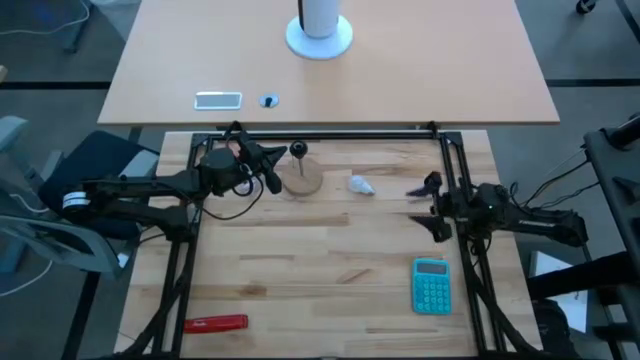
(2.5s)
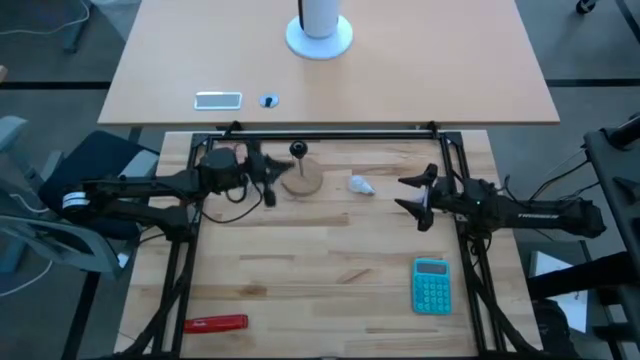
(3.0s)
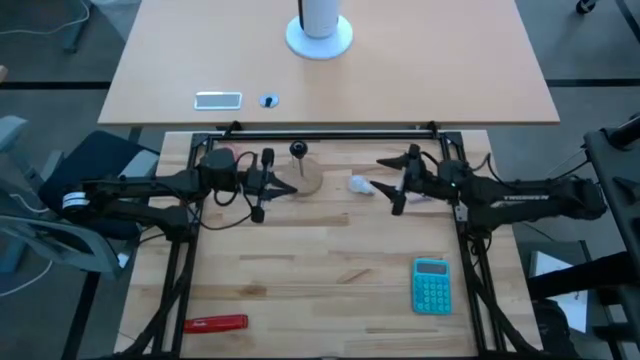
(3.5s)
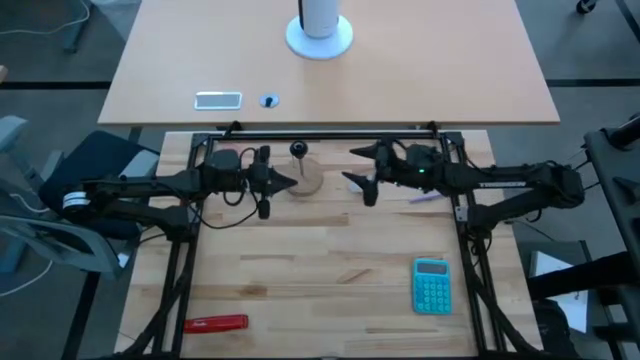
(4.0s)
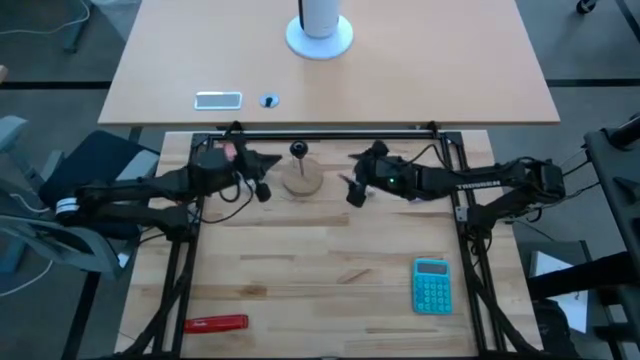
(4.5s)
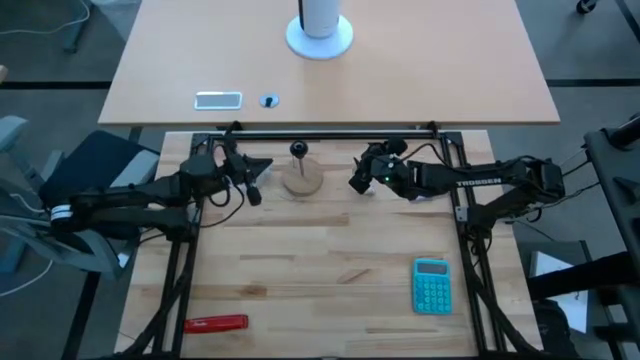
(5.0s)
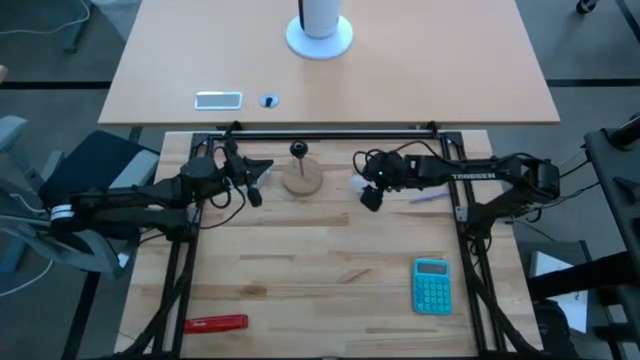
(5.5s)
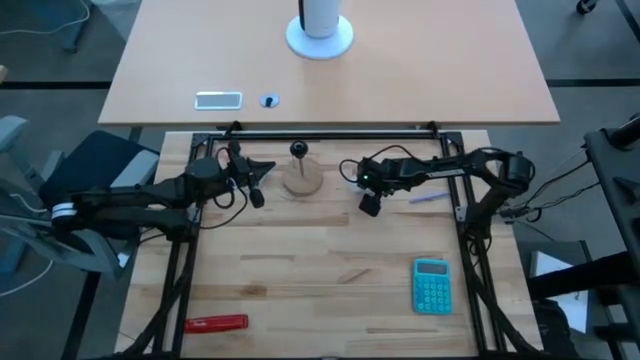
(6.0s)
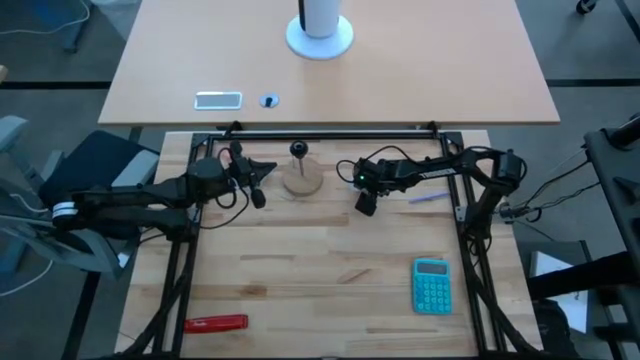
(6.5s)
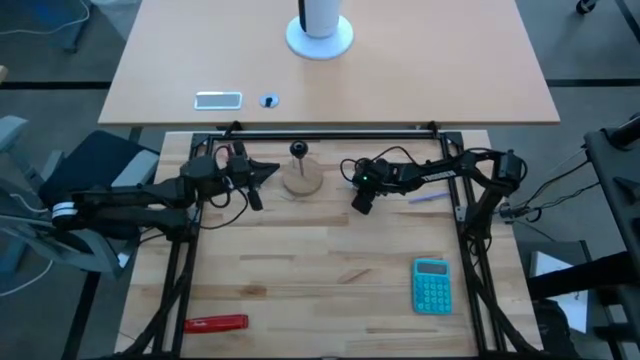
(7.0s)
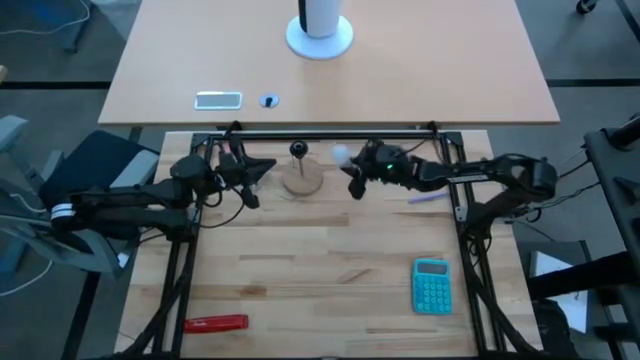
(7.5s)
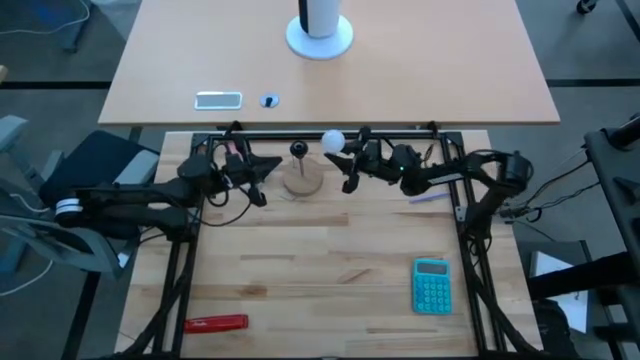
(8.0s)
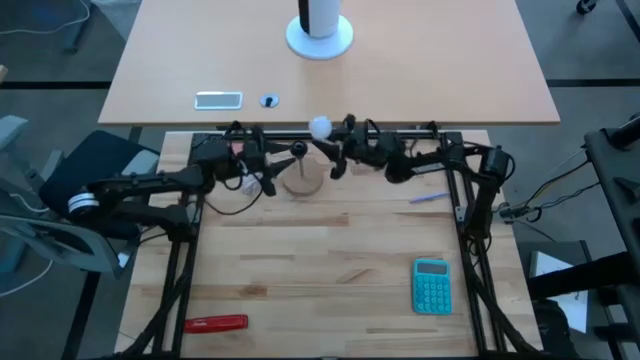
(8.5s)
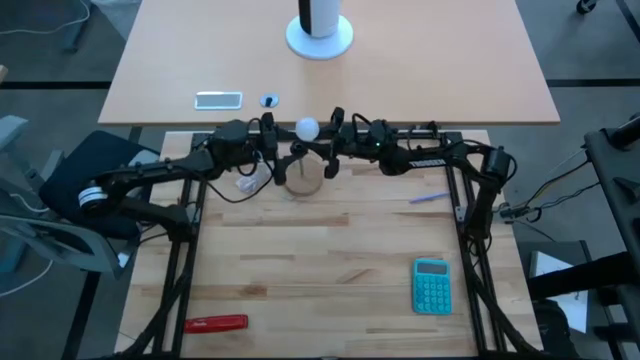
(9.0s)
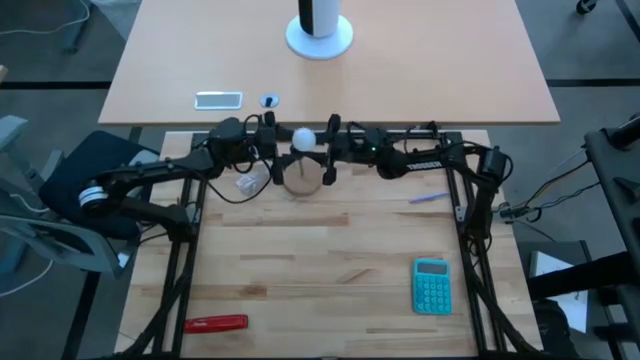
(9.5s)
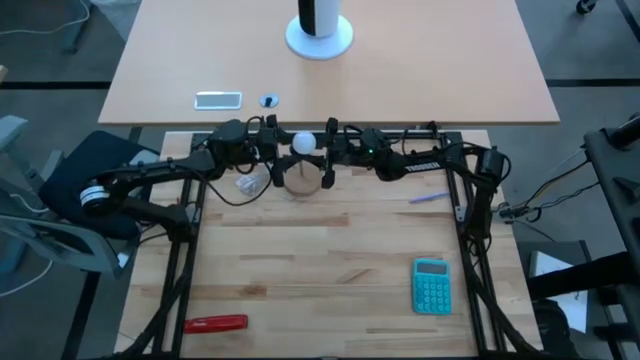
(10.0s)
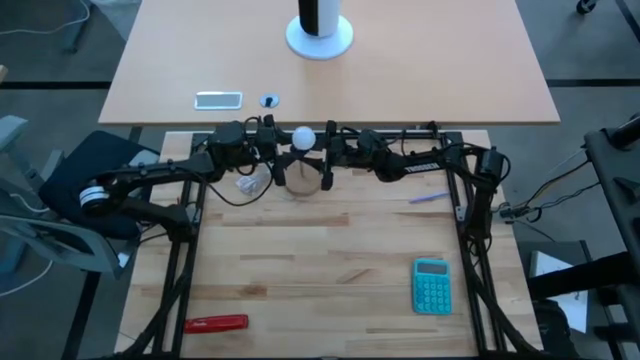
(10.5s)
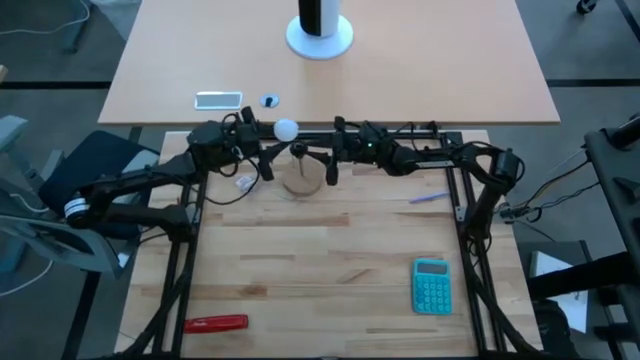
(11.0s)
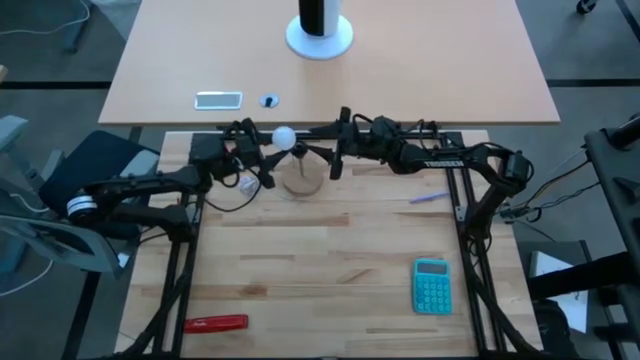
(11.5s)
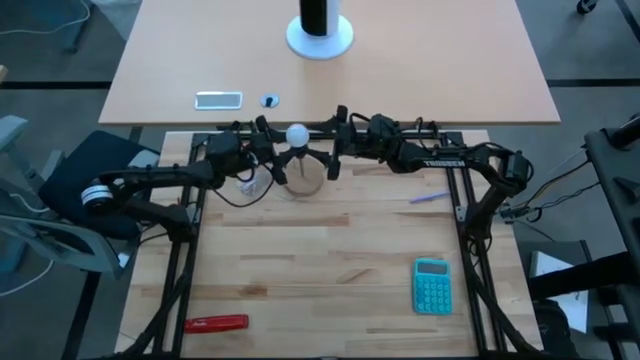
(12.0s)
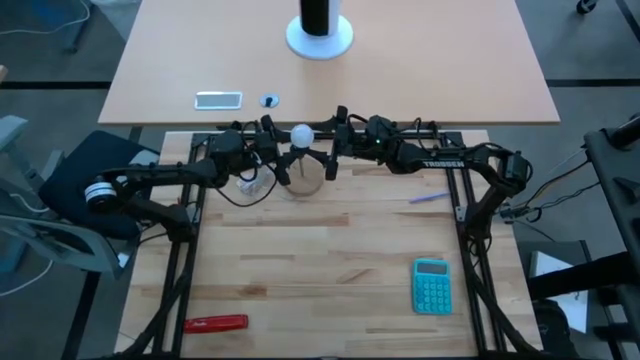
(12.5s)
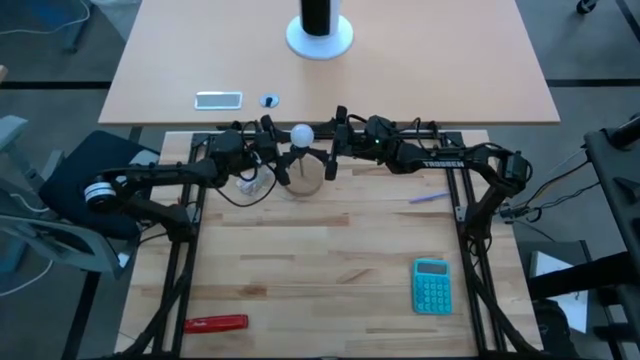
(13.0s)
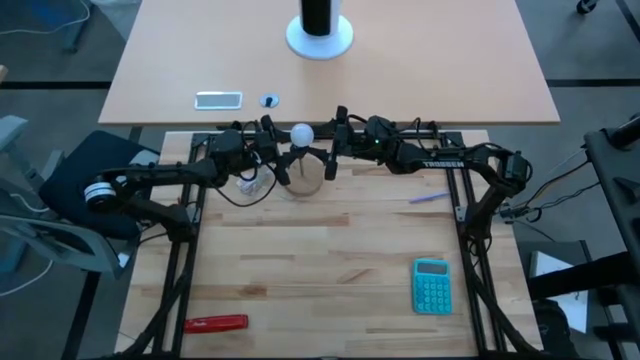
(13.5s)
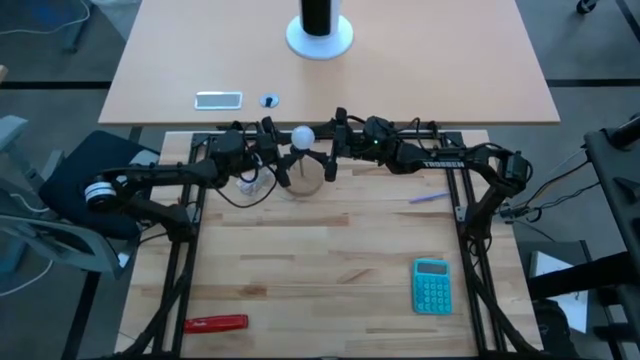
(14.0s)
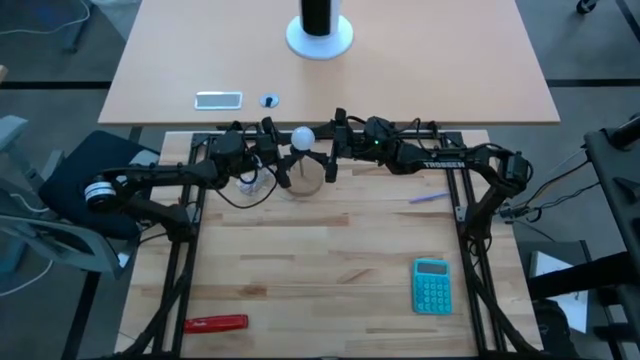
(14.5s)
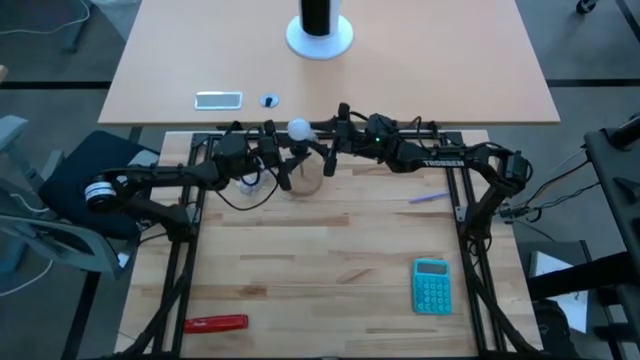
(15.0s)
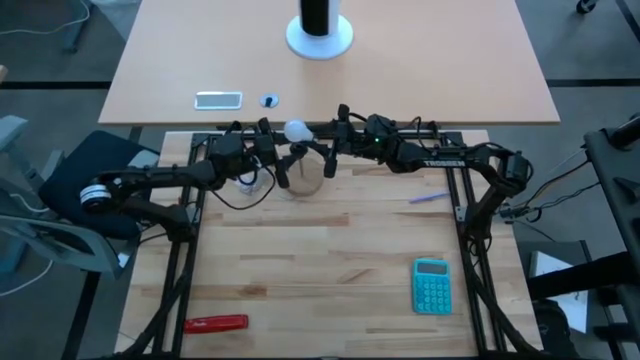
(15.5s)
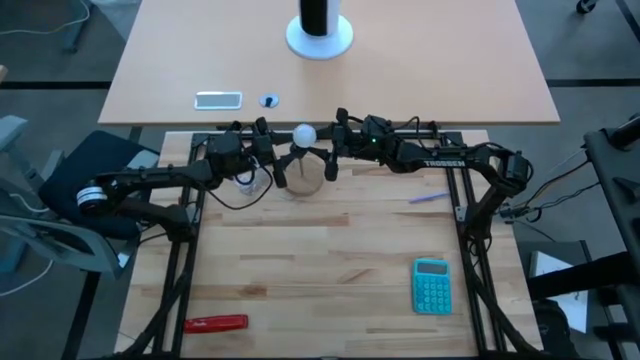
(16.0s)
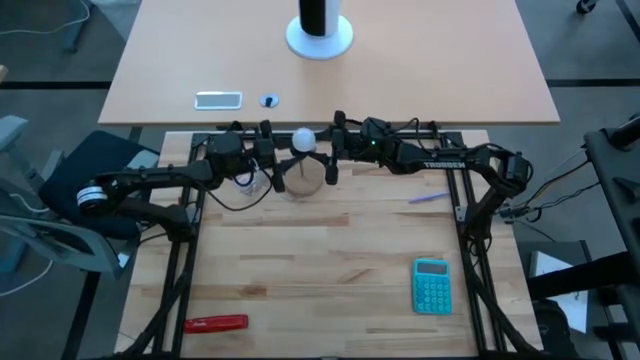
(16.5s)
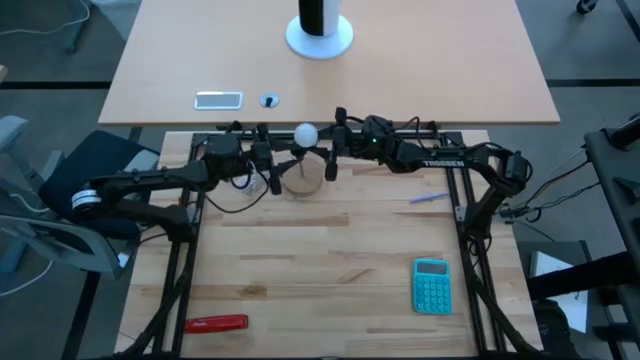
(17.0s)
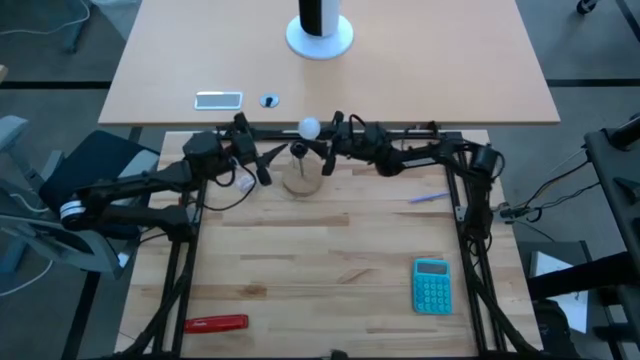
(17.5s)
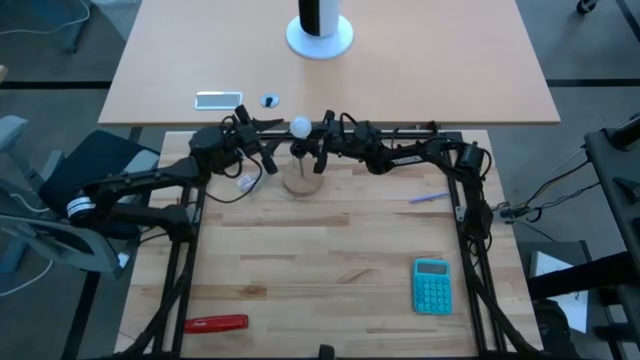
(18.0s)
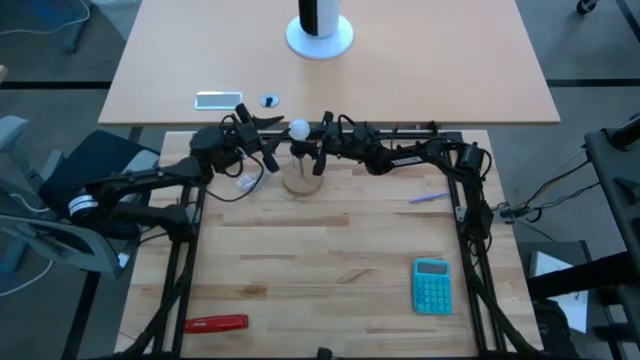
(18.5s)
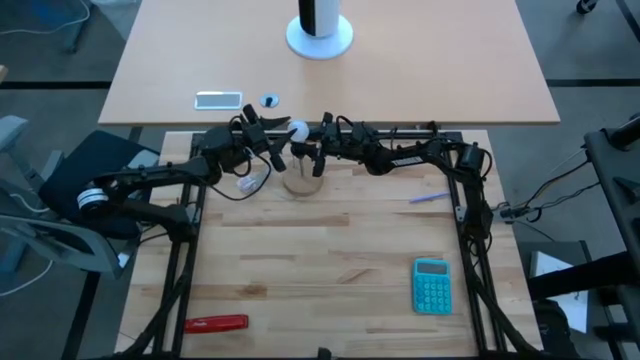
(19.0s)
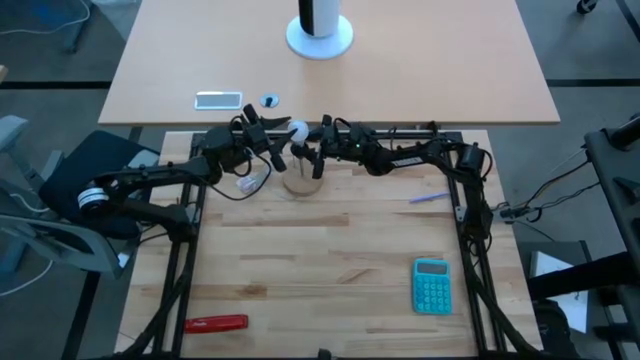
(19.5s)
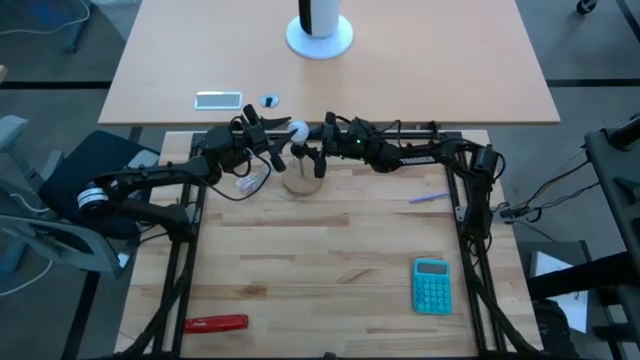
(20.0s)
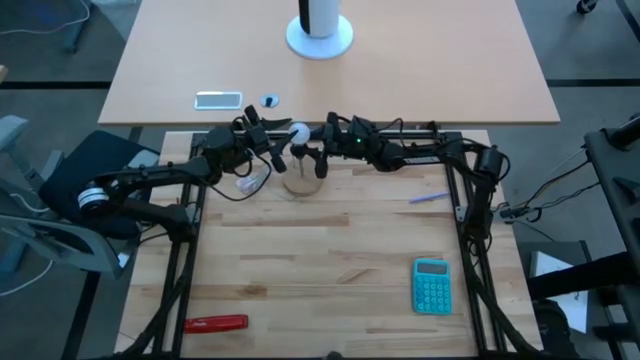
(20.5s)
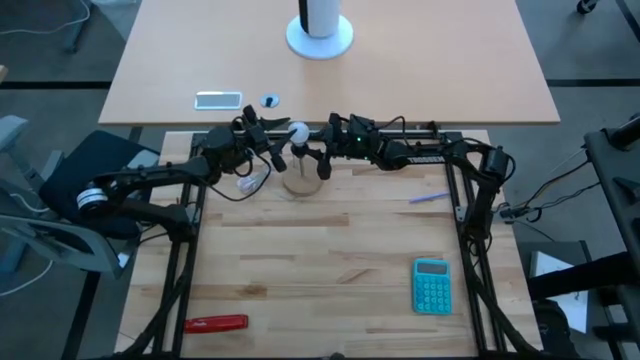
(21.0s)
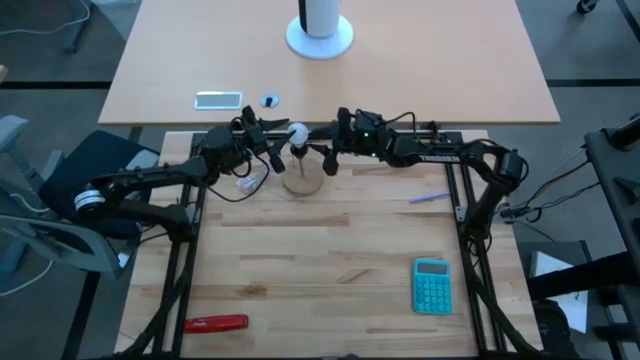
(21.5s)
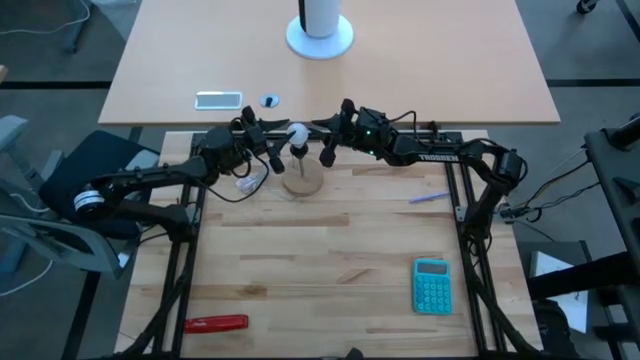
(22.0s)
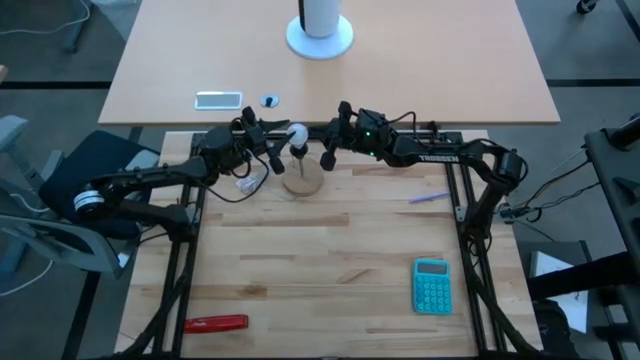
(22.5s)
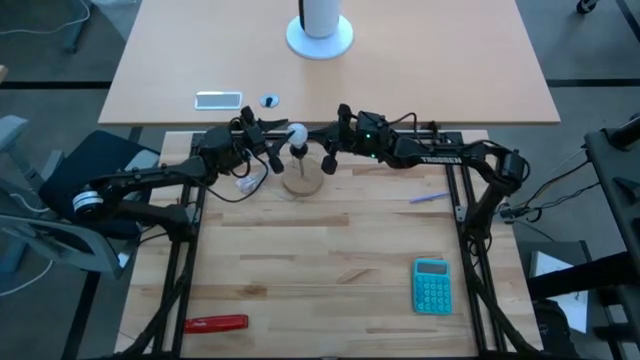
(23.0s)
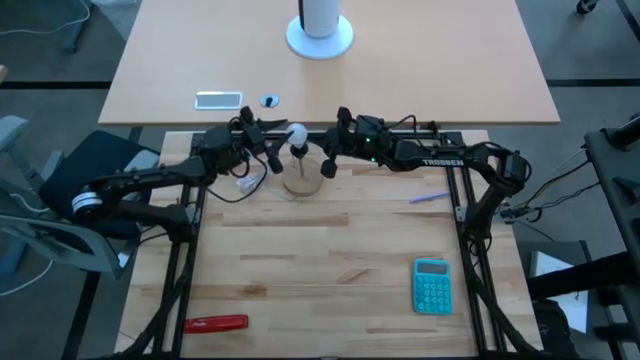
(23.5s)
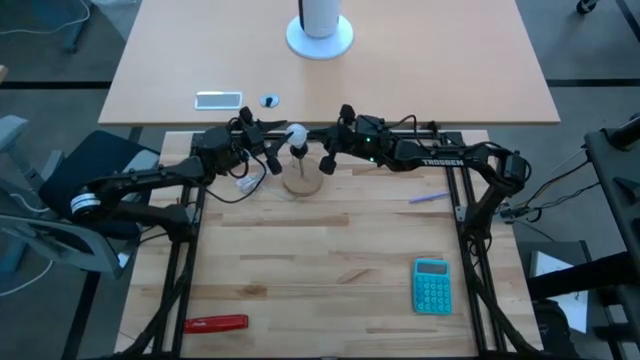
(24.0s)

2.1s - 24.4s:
Task: Screw lightbulb
Insert the light bulb into the bulb socket
